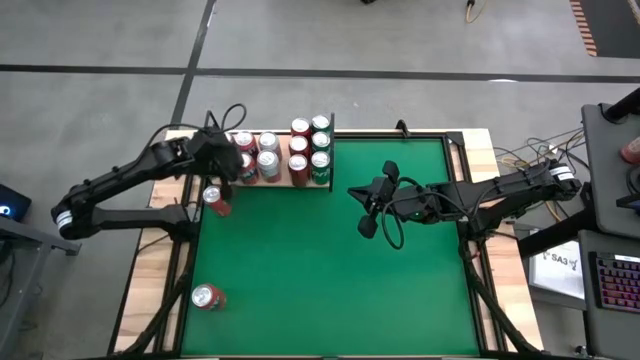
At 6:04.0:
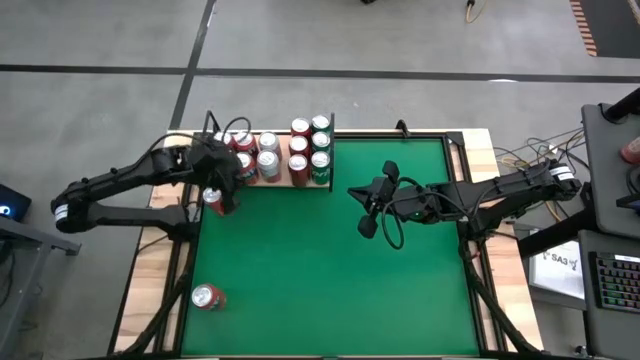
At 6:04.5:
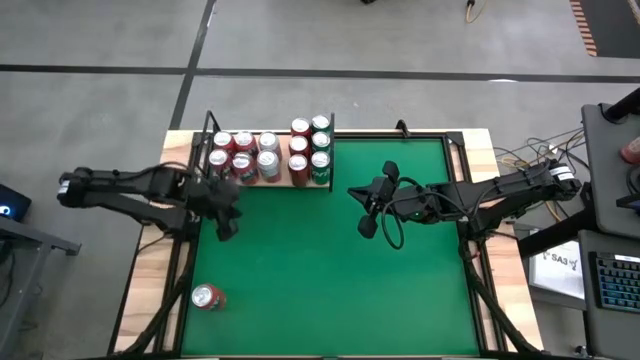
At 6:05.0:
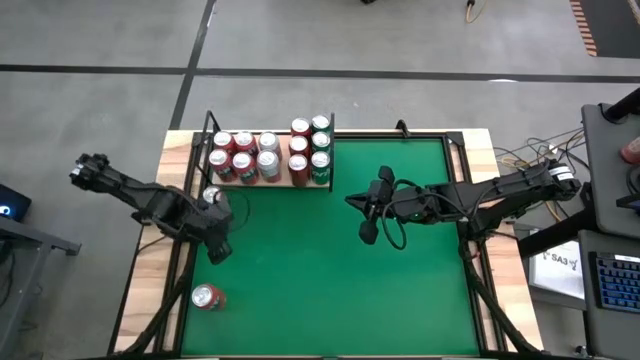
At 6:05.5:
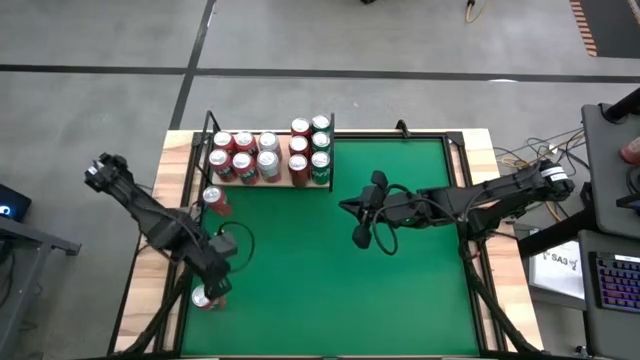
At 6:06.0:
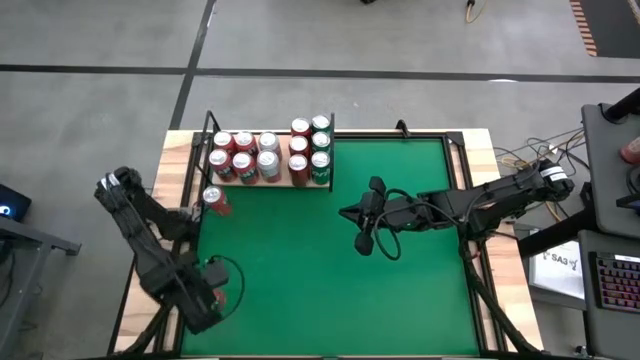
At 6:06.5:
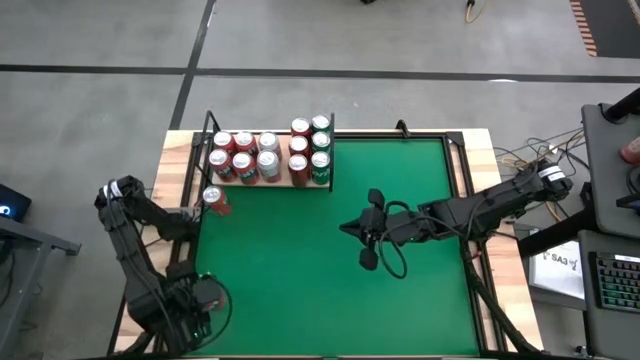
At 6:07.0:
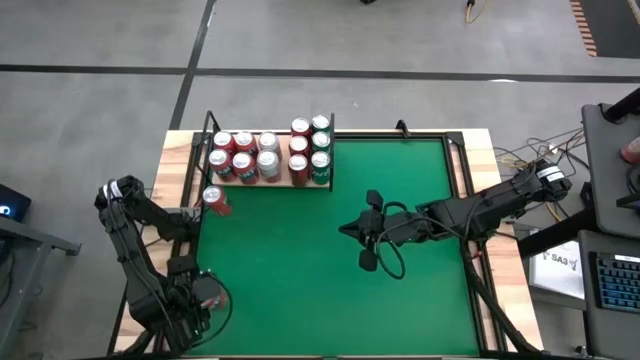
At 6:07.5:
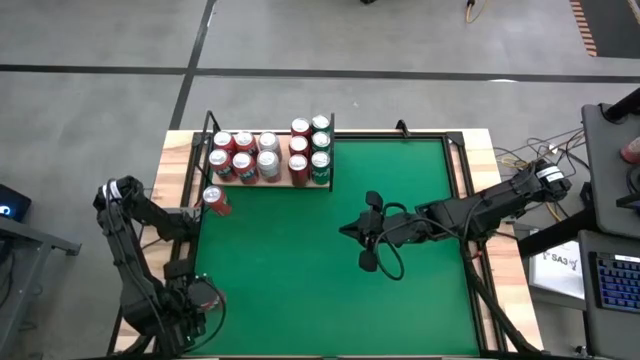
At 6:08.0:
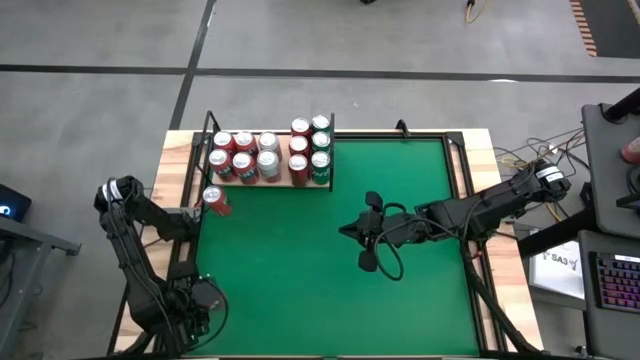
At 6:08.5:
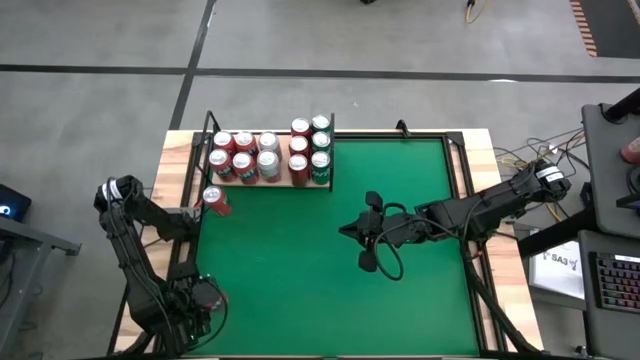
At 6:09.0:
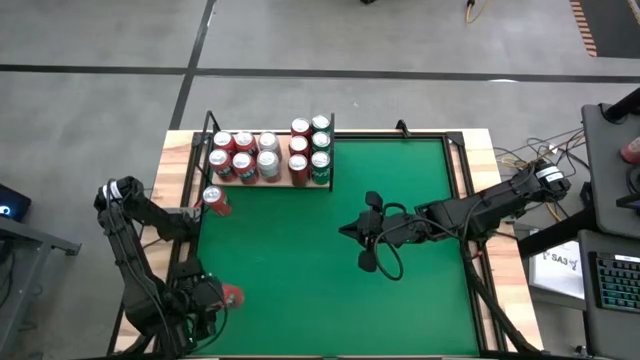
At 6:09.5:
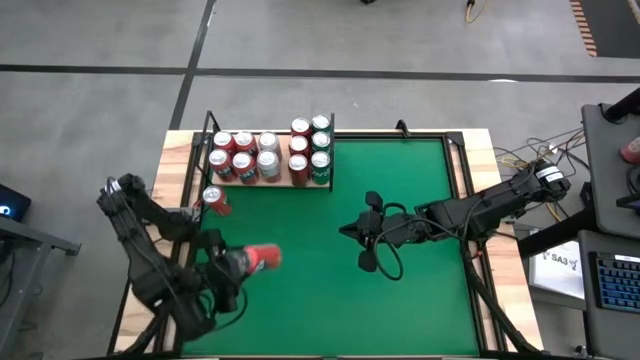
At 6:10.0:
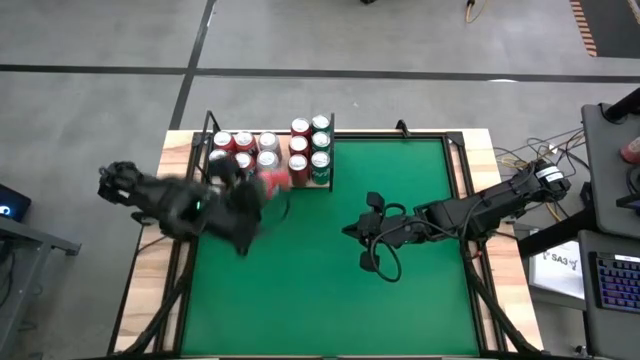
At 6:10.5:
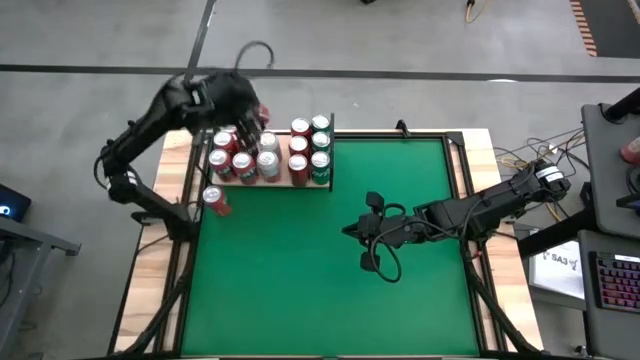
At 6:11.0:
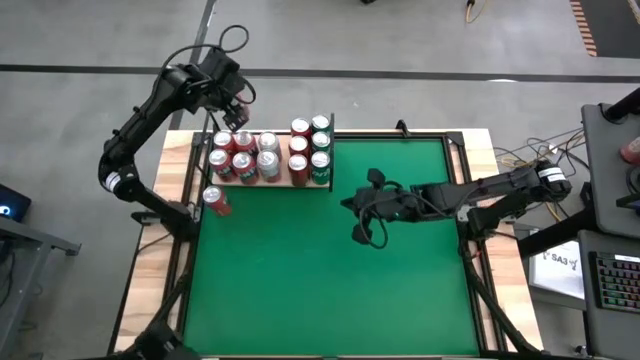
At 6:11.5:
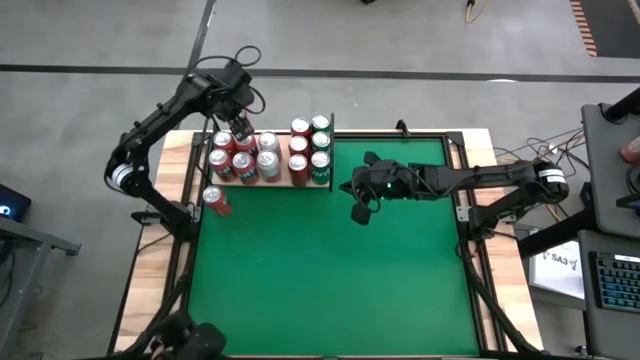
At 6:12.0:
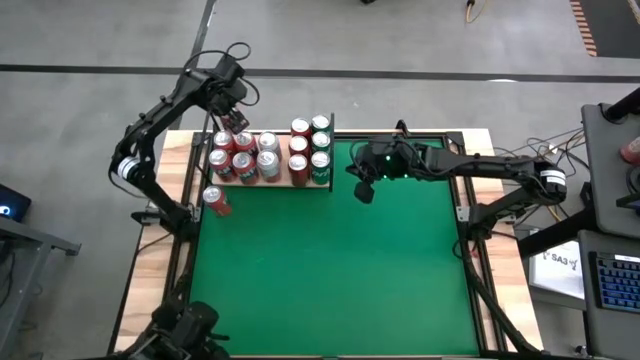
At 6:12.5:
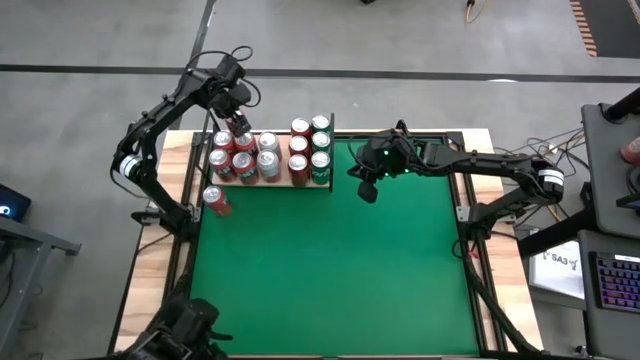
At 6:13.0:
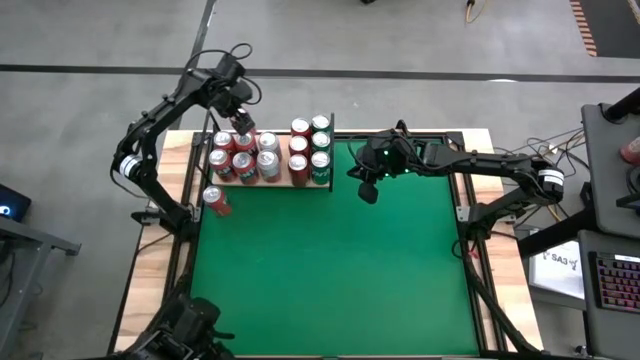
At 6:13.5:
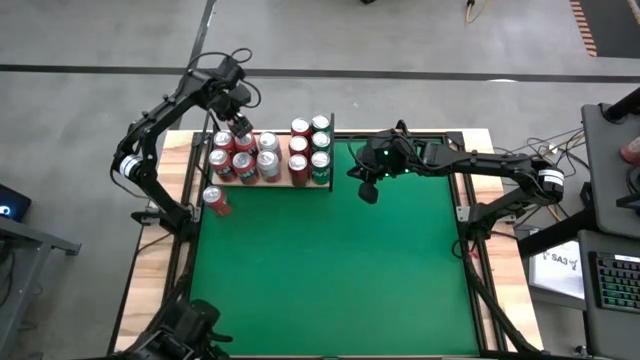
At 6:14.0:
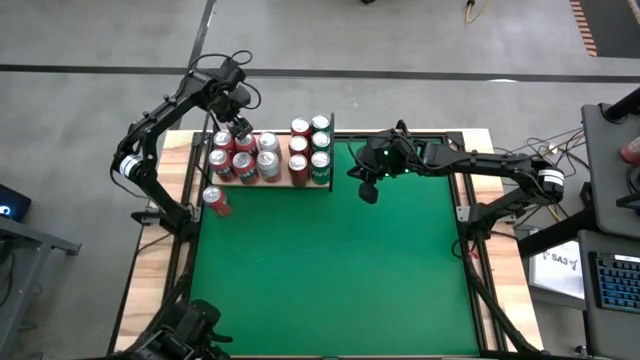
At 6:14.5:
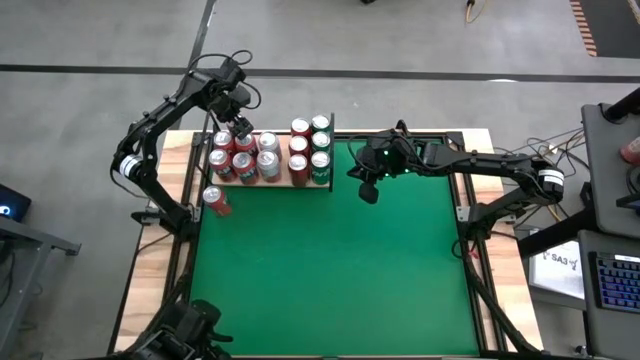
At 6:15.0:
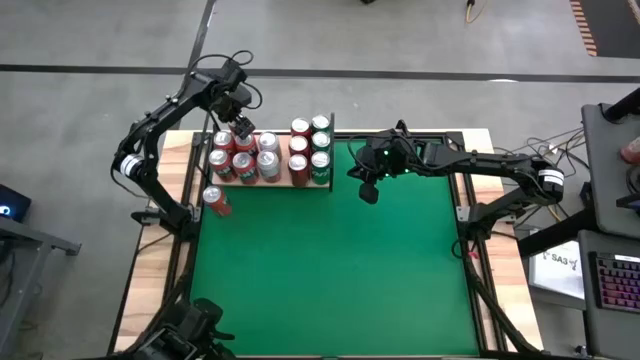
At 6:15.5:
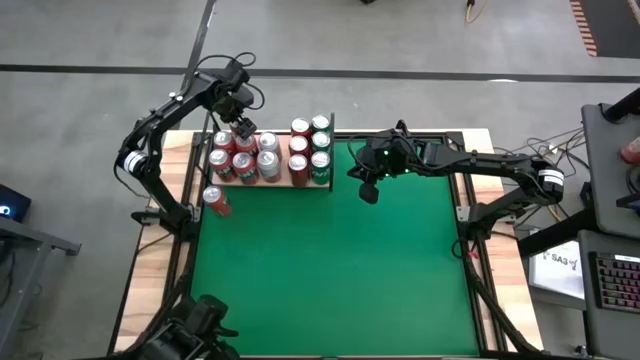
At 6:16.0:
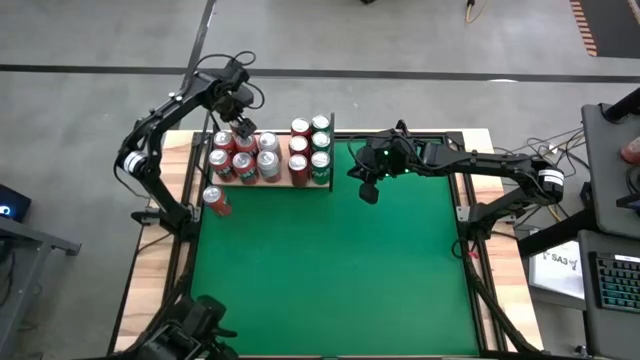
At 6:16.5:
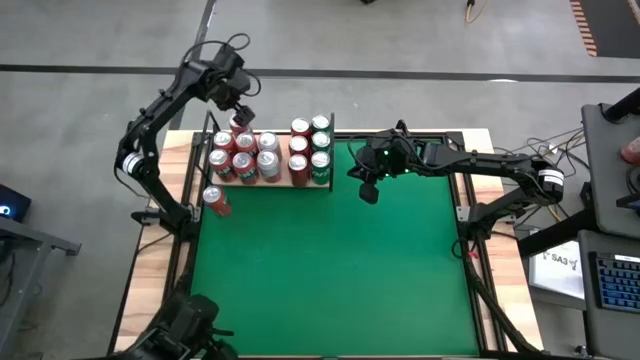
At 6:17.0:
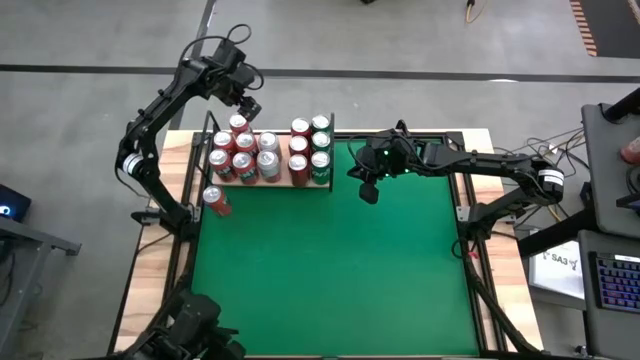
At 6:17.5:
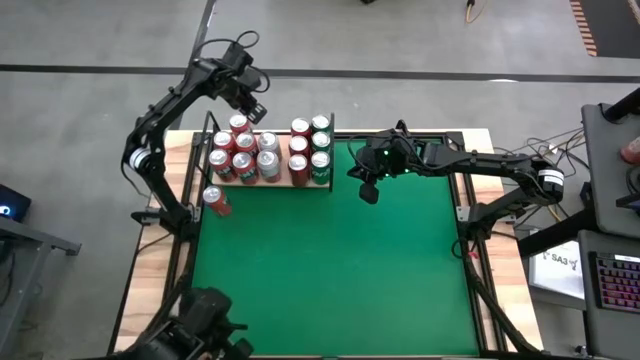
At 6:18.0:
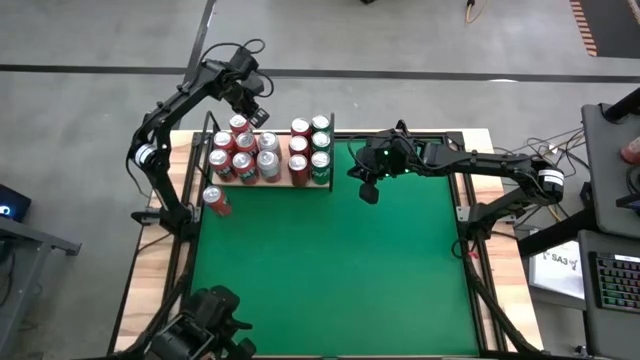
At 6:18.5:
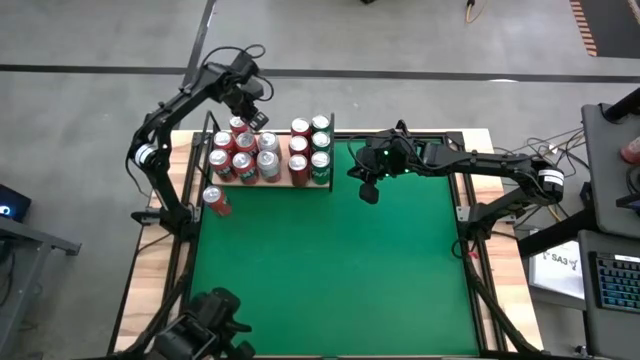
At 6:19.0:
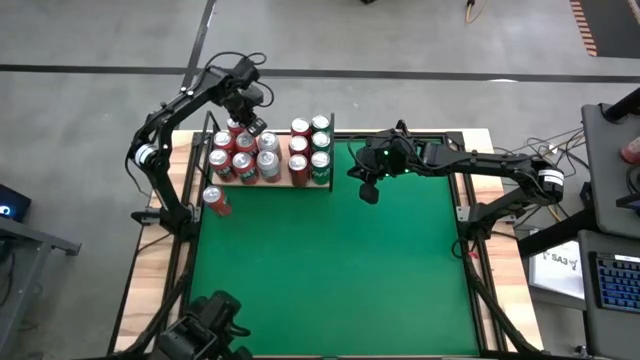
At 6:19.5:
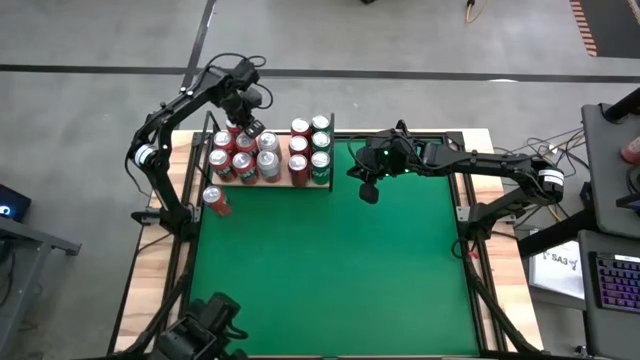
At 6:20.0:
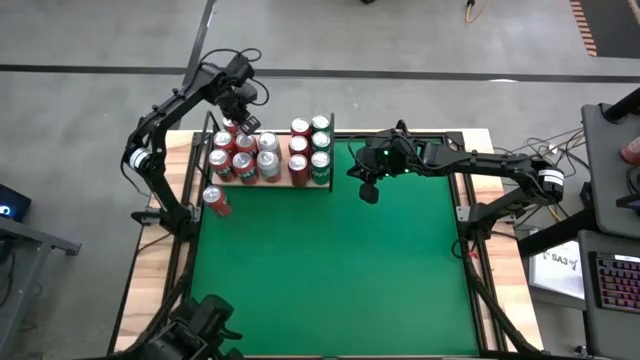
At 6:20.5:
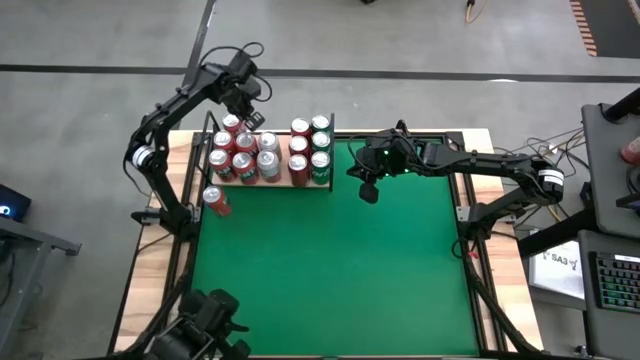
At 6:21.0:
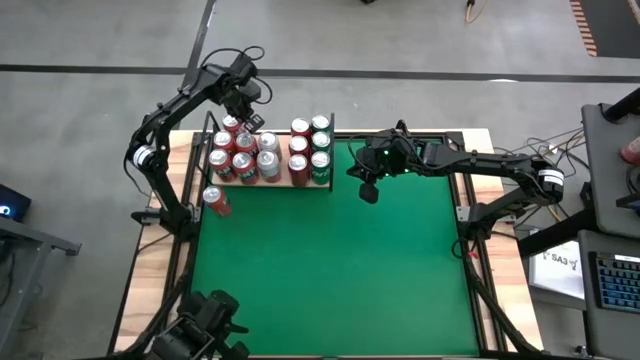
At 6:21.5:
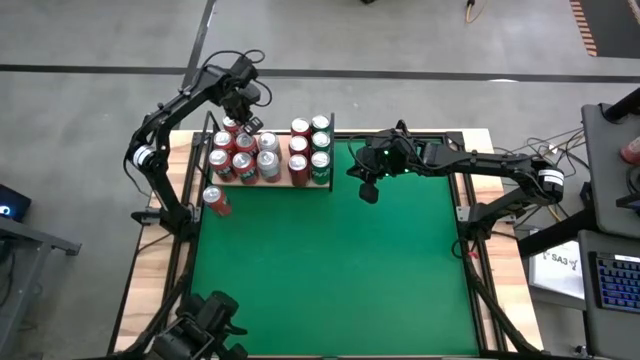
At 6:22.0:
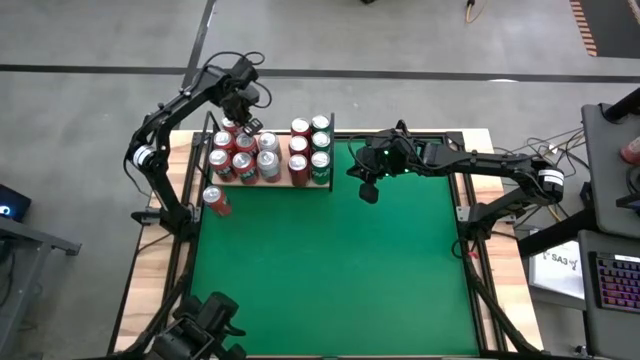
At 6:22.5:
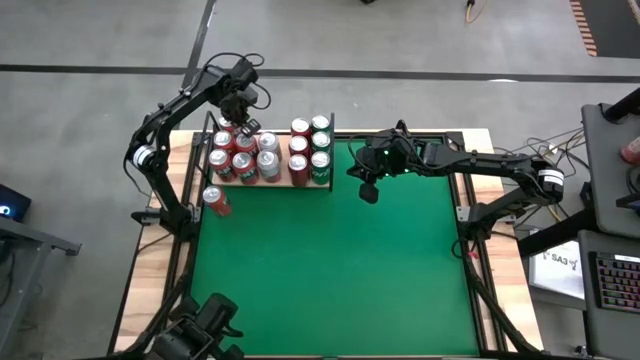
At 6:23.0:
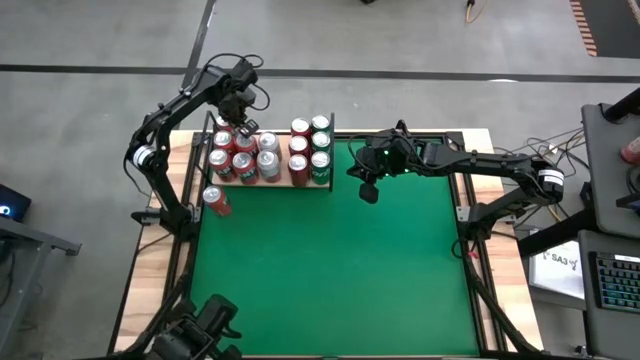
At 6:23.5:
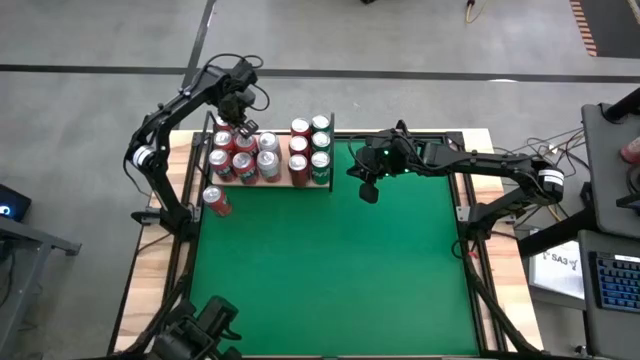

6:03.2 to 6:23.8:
Task: Place canned beverage on shelf
Put the red soda can on the shelf aligned with the other red soda can
